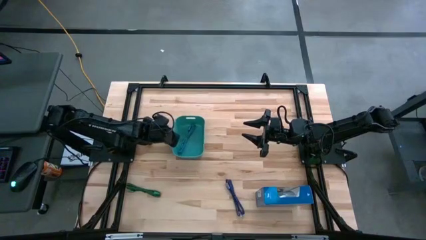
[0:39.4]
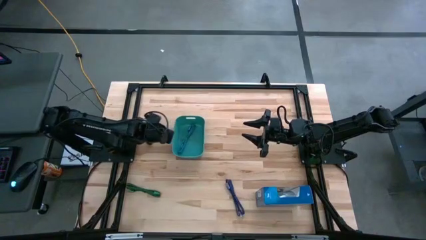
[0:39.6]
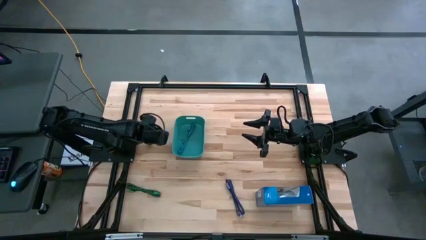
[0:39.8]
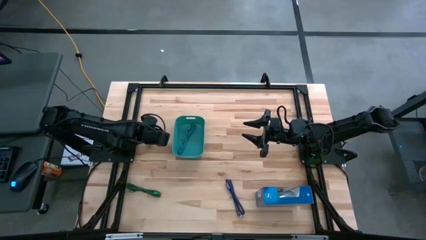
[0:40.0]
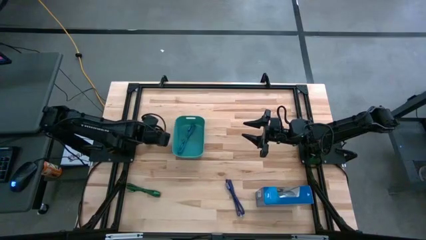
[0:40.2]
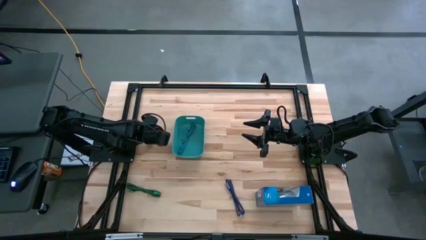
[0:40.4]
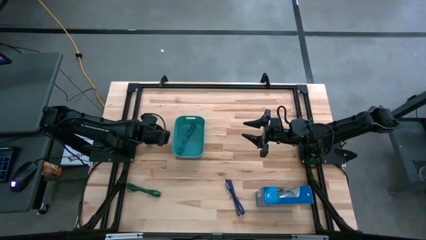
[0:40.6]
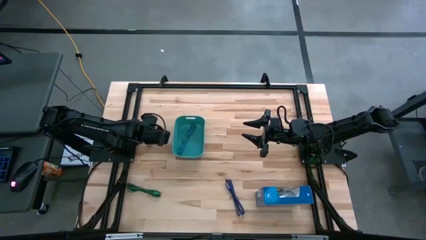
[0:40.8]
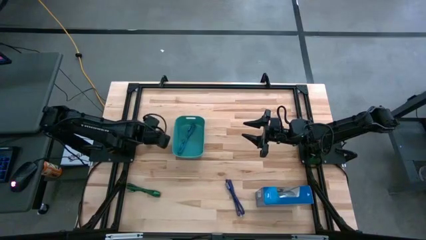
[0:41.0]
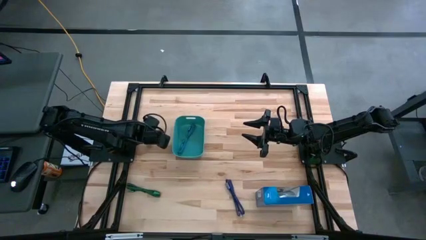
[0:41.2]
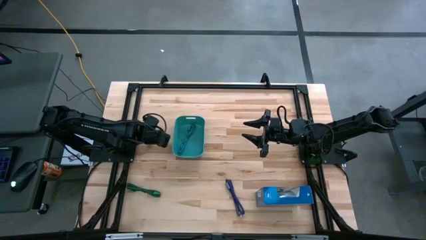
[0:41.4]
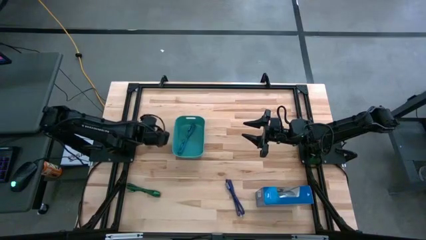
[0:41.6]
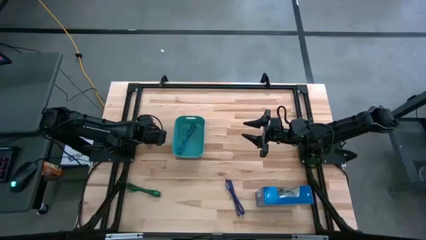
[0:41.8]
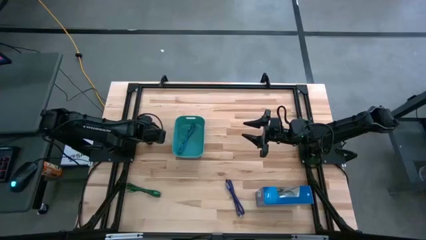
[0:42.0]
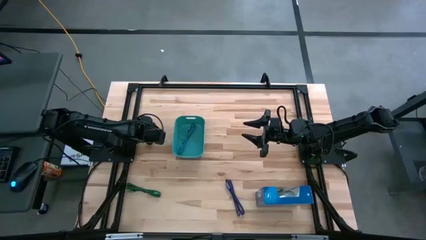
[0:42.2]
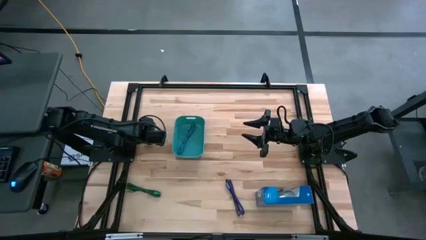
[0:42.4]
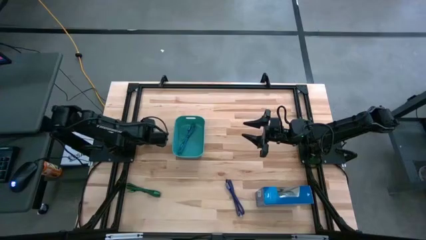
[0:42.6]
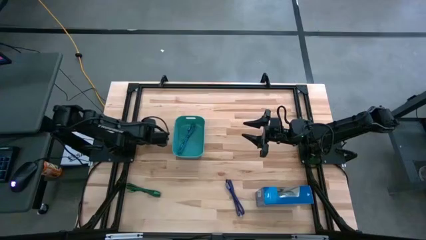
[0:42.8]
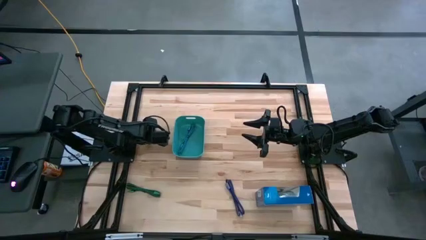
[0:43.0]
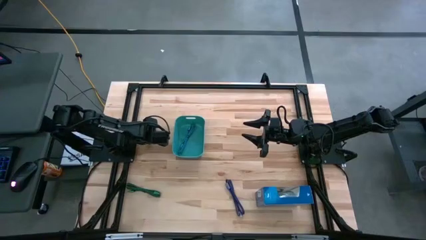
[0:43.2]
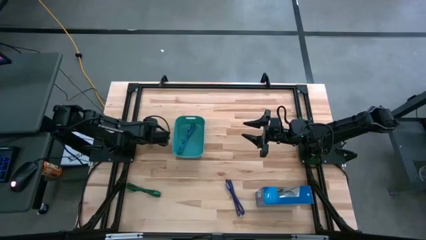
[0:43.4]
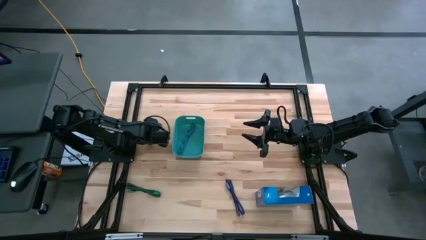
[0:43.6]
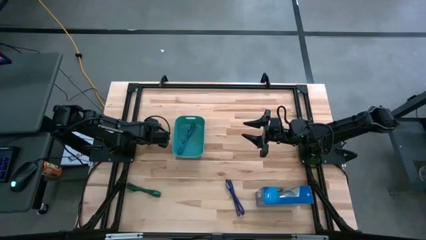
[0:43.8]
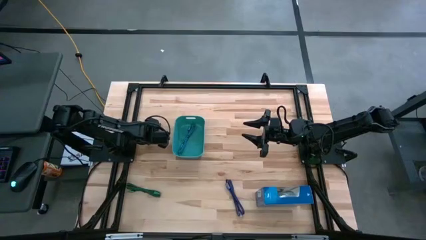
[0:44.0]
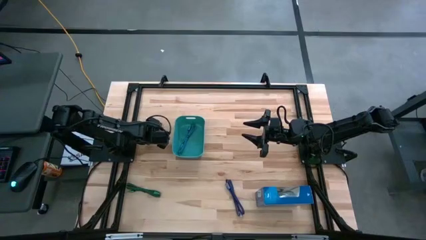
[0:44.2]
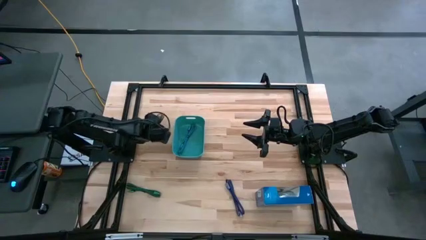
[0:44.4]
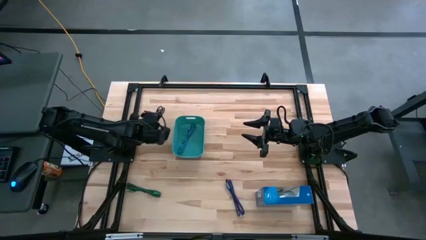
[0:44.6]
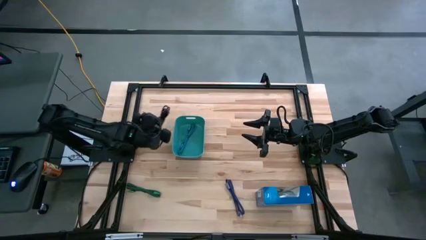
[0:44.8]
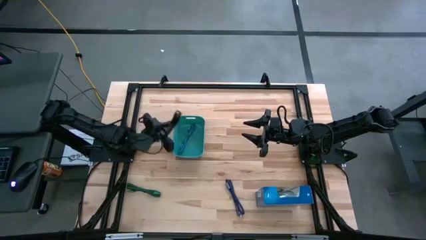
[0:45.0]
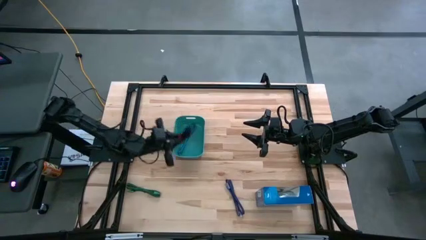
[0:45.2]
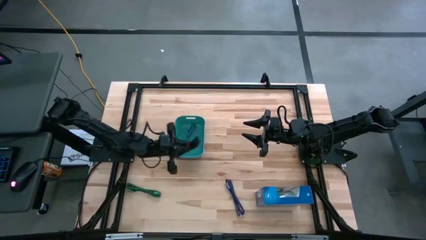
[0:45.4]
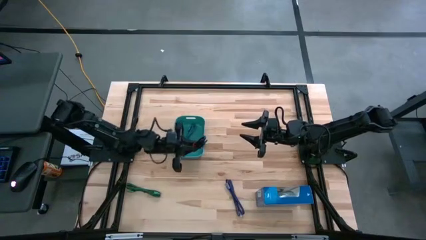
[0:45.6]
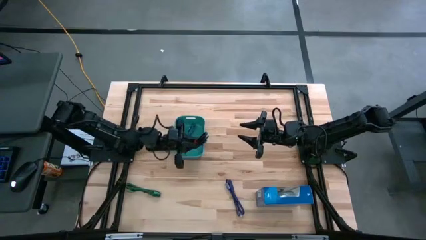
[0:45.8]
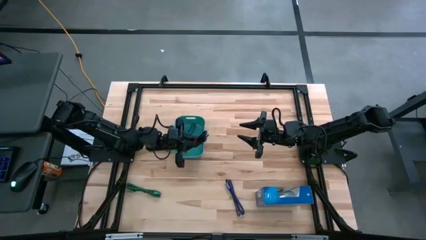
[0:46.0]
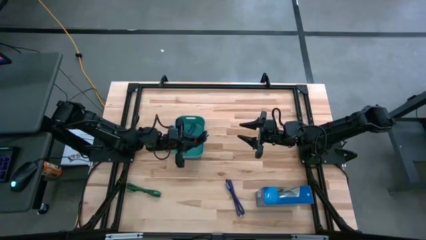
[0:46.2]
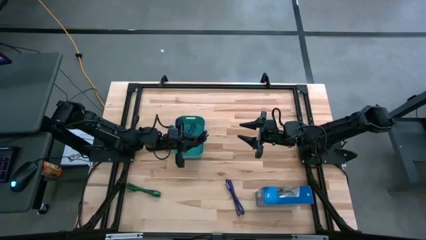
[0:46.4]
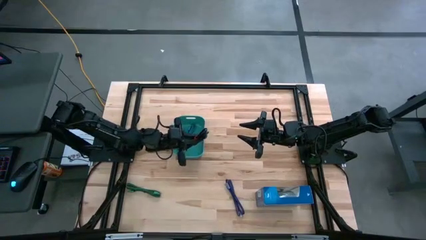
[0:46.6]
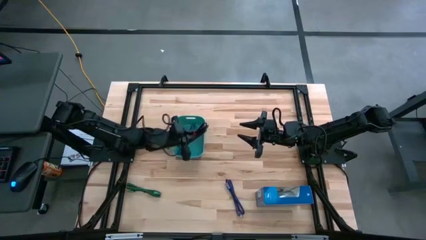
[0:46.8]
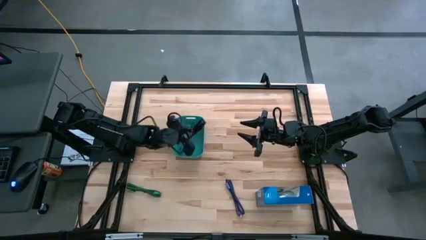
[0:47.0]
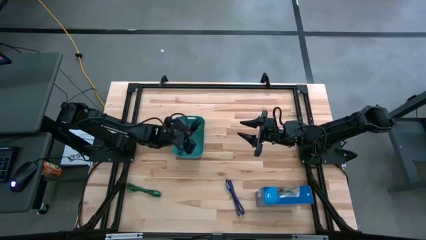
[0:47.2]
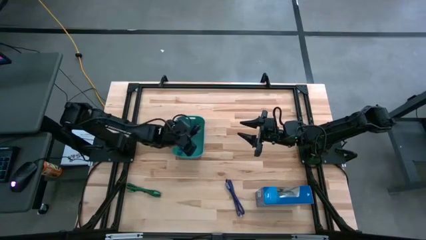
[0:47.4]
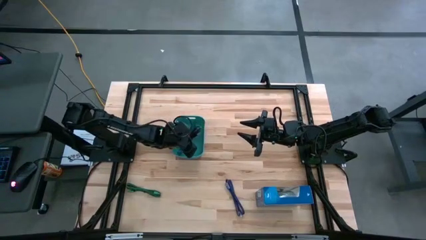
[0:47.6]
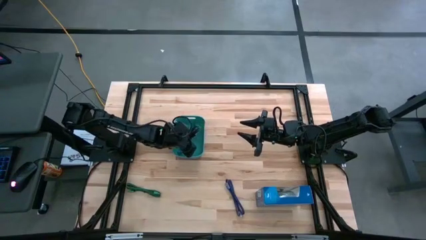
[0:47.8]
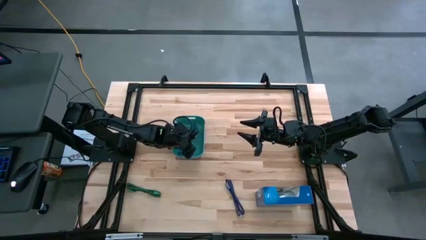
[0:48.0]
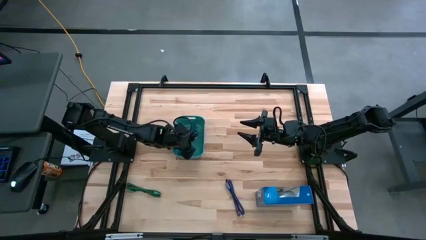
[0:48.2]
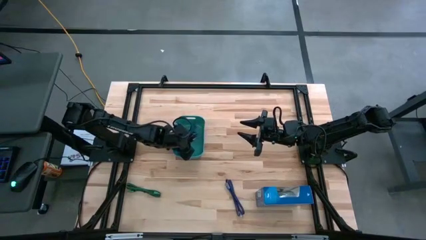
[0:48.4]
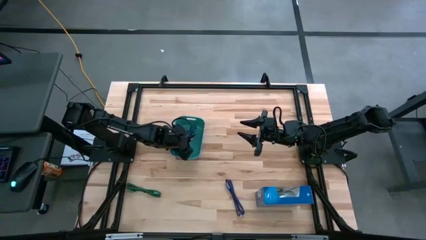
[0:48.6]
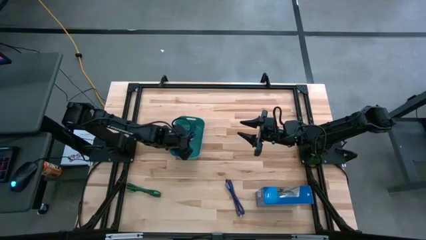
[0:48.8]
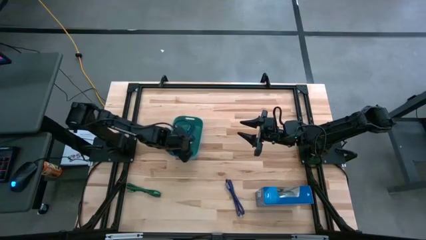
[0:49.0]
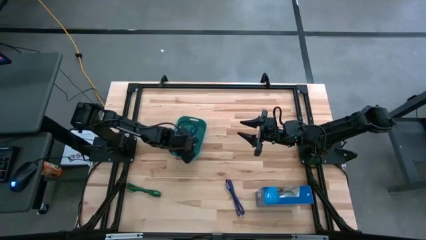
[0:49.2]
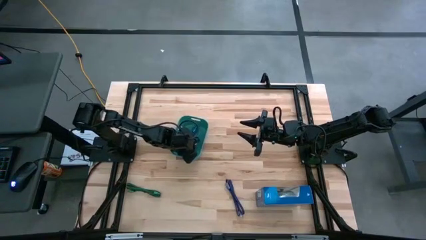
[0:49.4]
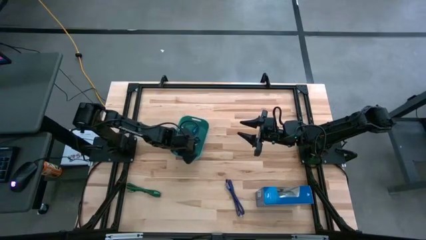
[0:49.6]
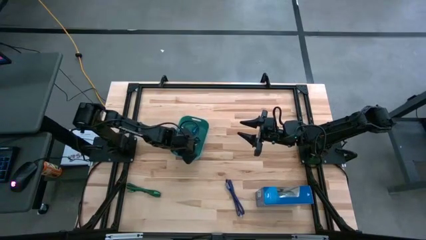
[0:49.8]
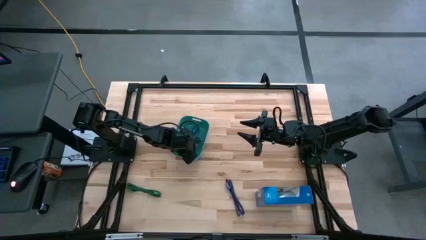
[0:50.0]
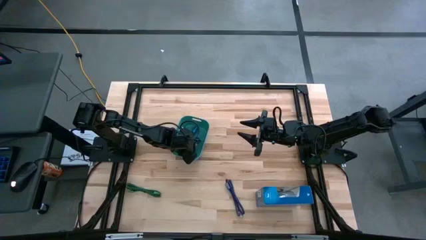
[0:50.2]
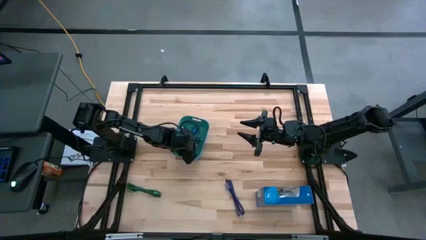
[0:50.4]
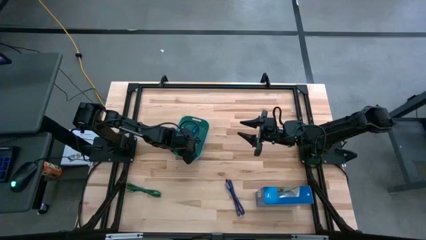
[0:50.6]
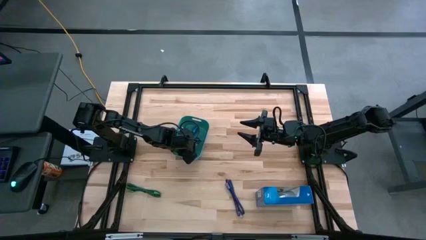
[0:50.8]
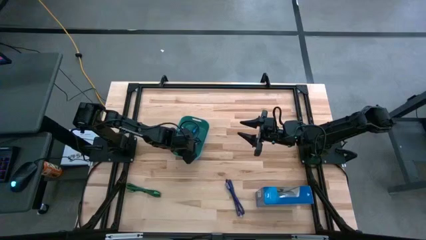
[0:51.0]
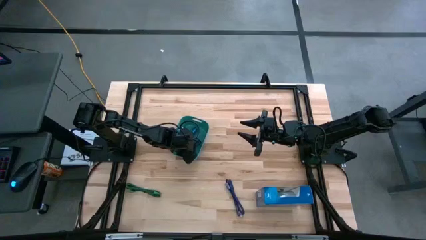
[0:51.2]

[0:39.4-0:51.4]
Task: Pick and place USB-C Cables
Put the black charger cable into the bin

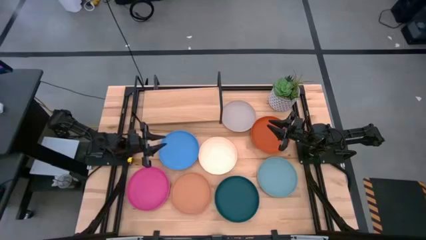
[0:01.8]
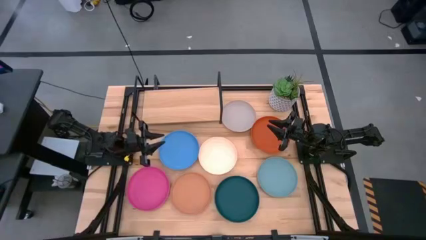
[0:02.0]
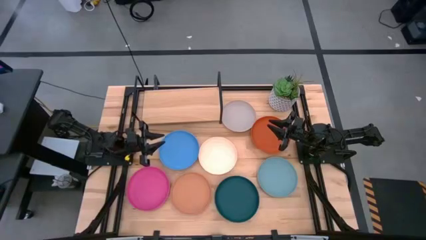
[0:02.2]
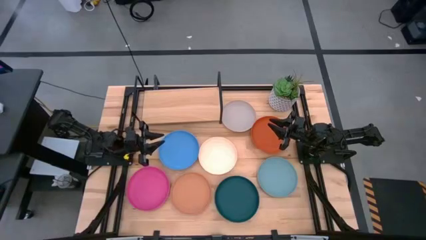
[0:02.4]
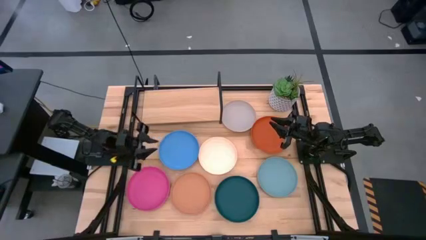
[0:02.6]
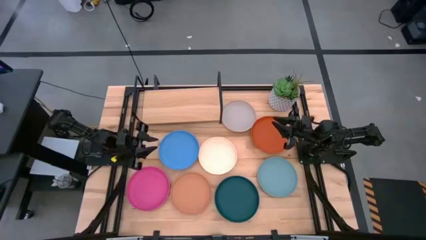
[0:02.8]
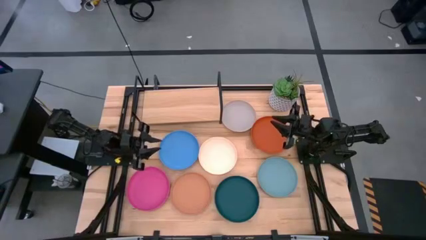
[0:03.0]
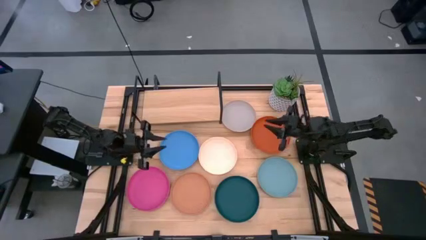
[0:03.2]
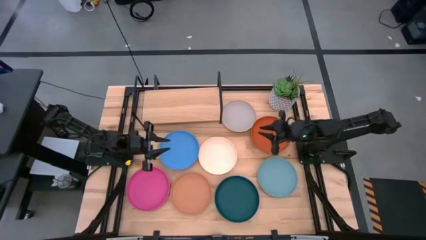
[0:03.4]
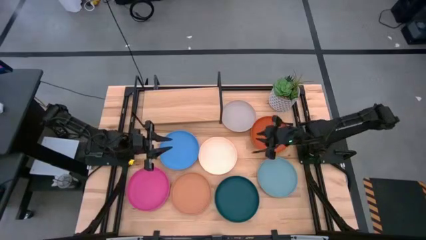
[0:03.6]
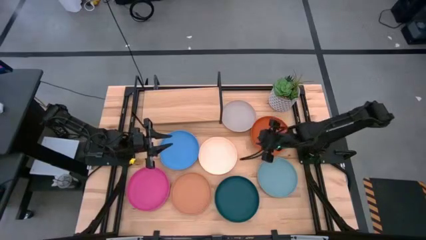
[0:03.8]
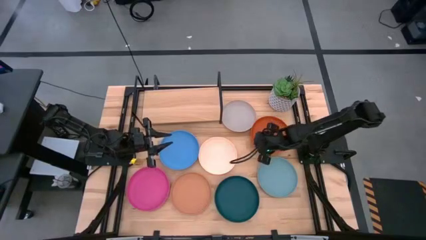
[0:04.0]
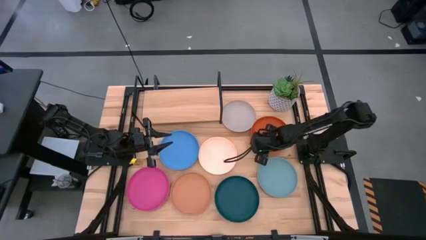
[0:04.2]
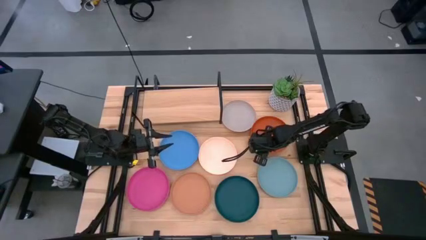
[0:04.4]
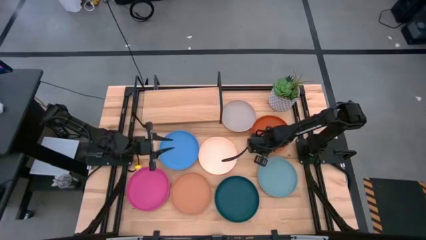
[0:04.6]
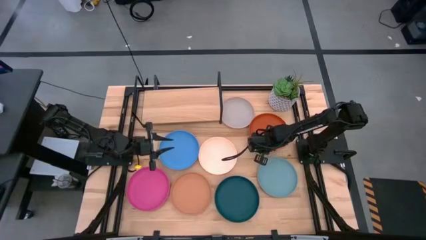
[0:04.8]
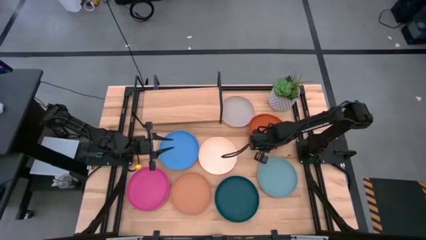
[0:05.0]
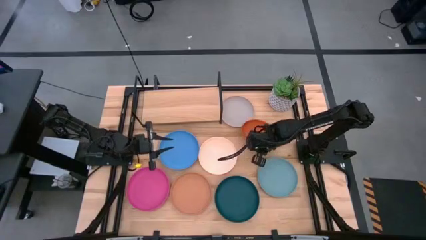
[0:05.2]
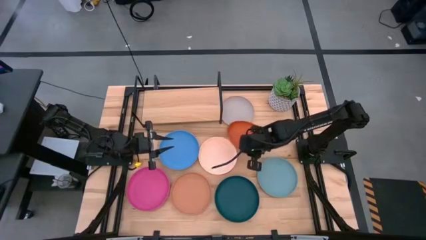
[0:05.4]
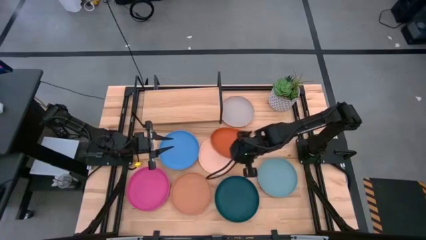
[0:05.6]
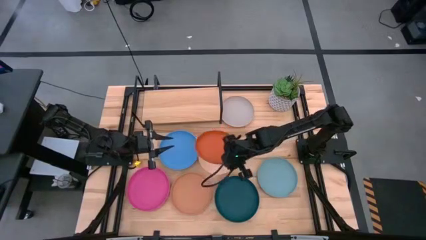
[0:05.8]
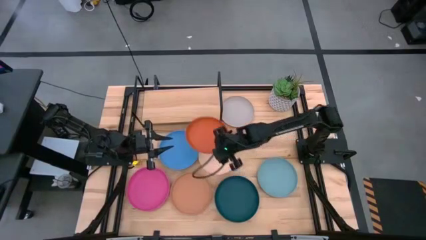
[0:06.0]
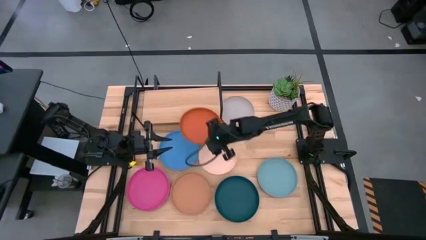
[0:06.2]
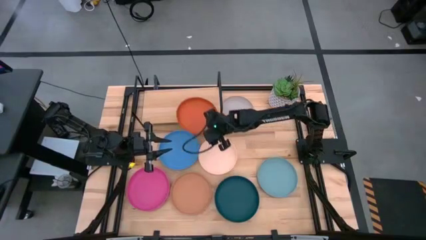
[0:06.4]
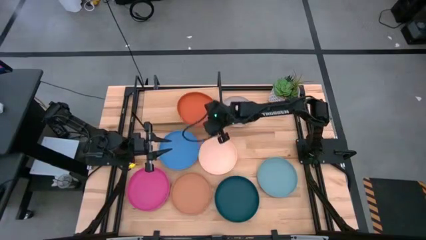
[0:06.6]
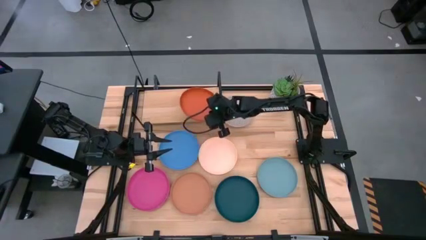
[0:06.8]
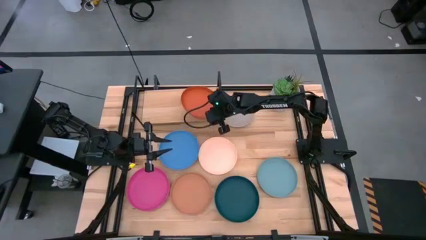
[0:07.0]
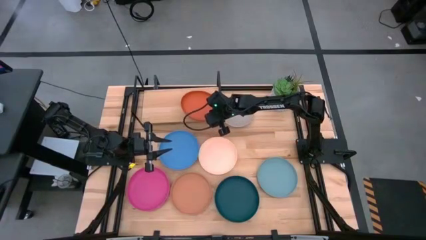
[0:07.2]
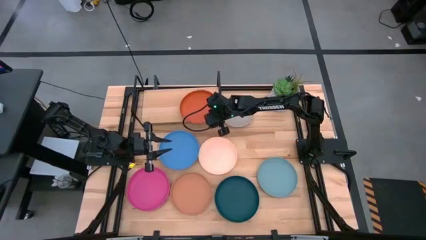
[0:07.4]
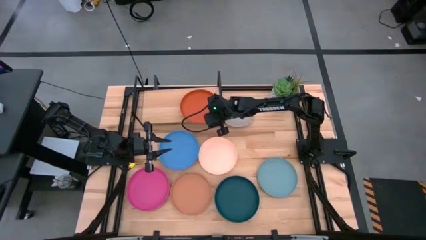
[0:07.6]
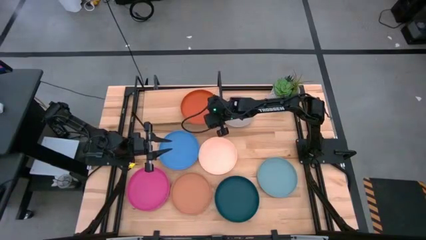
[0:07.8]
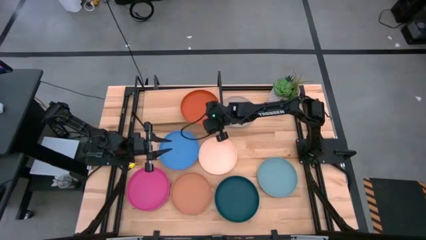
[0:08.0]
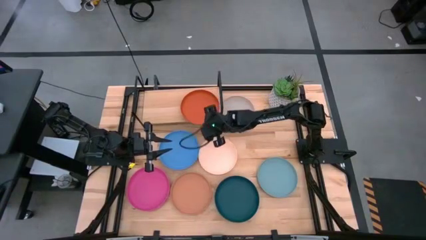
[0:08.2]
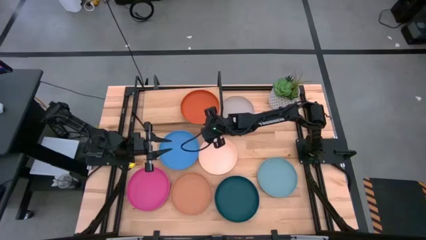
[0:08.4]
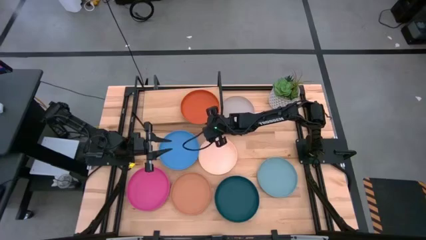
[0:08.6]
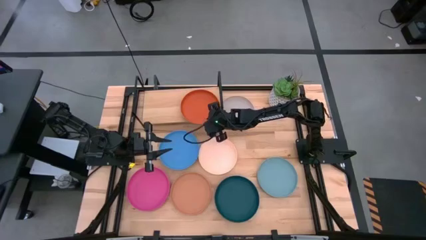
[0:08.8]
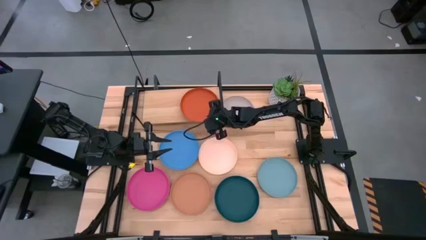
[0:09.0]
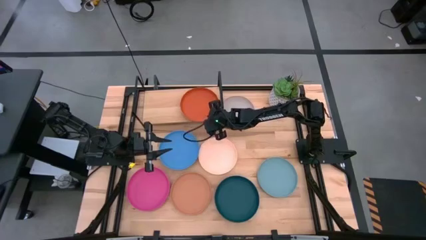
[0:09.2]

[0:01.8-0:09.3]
Task: Place and stack plates onto a shelf
Put the orange plate on the shelf
